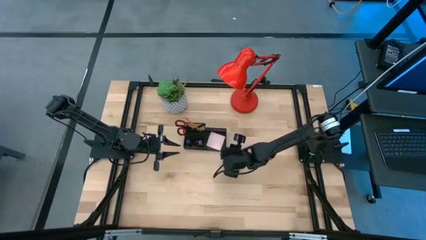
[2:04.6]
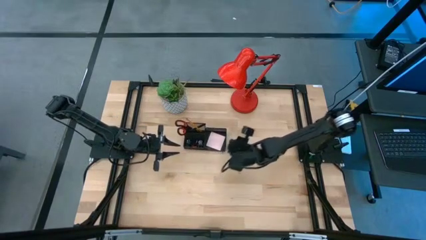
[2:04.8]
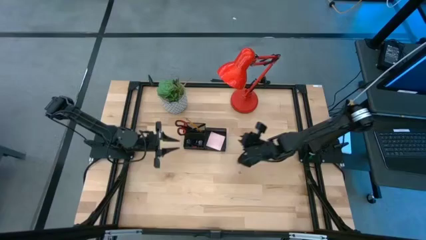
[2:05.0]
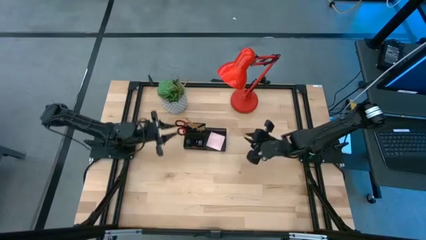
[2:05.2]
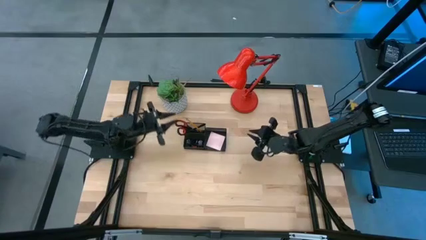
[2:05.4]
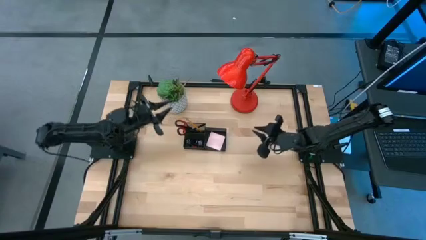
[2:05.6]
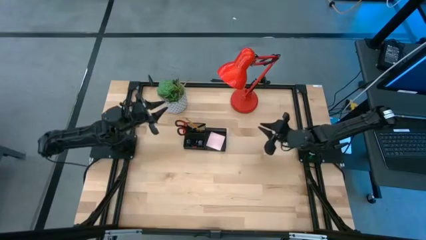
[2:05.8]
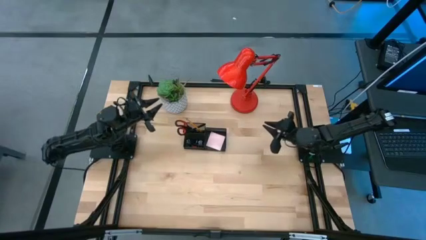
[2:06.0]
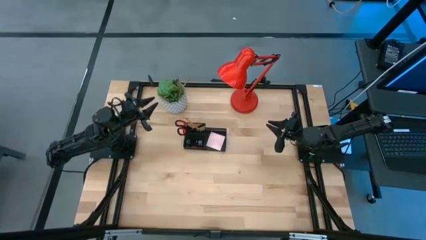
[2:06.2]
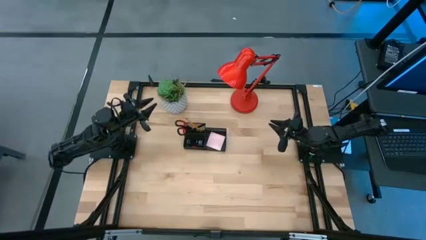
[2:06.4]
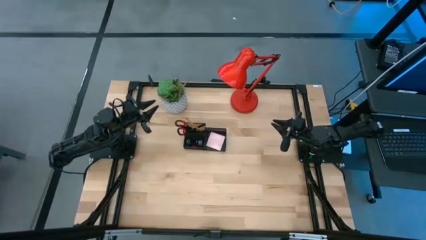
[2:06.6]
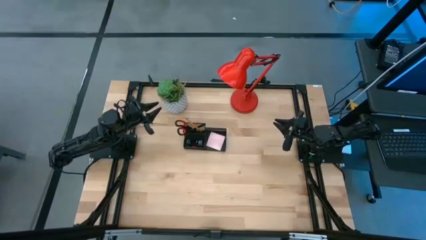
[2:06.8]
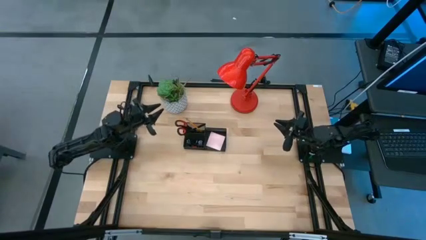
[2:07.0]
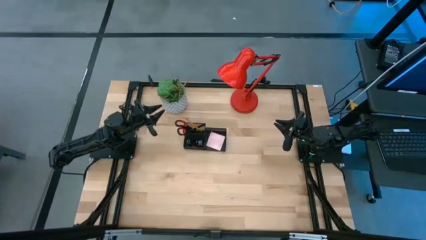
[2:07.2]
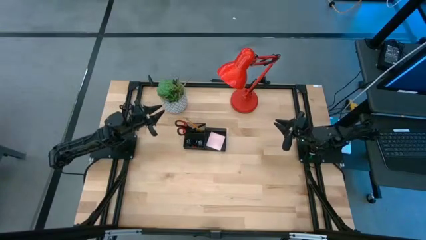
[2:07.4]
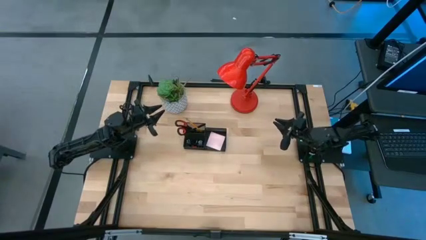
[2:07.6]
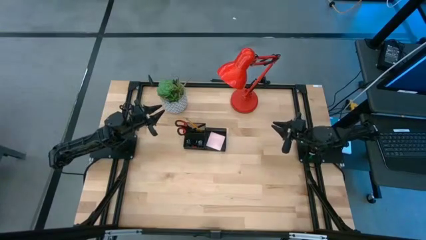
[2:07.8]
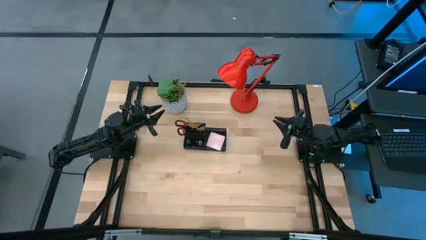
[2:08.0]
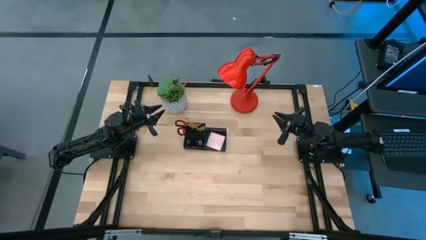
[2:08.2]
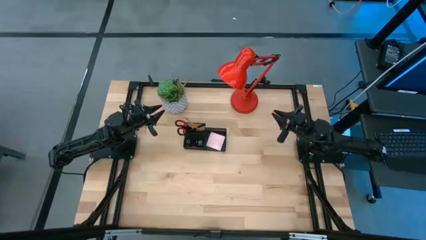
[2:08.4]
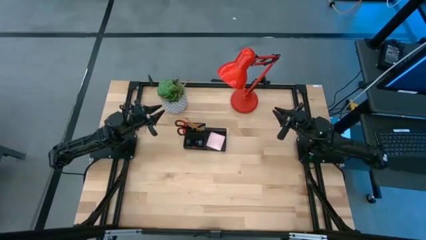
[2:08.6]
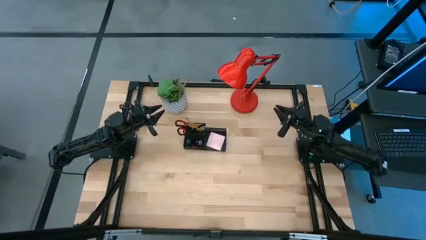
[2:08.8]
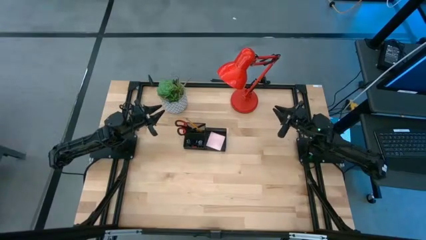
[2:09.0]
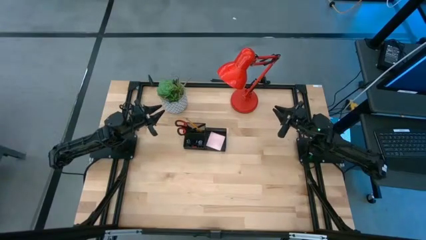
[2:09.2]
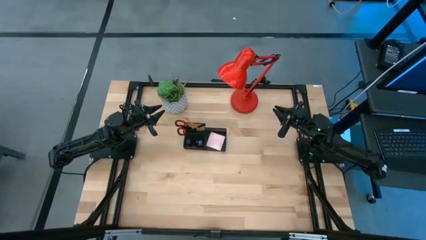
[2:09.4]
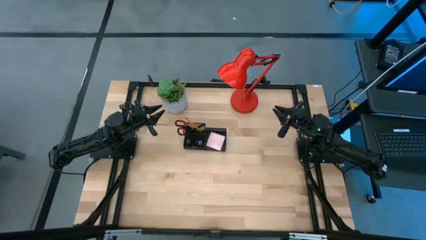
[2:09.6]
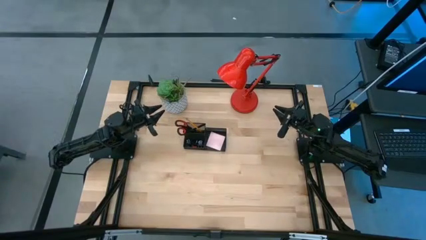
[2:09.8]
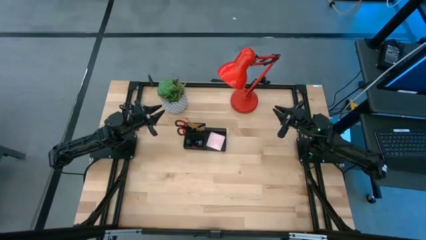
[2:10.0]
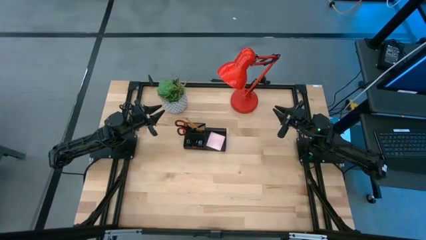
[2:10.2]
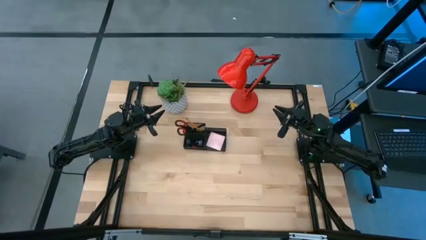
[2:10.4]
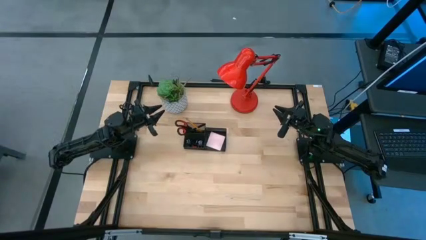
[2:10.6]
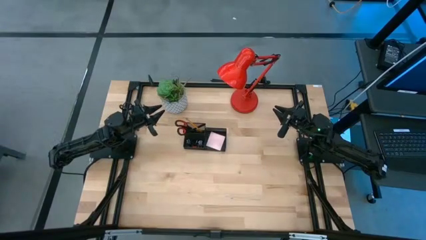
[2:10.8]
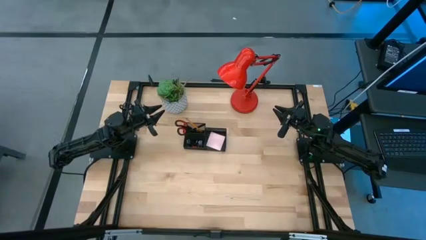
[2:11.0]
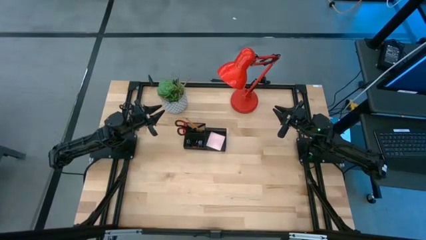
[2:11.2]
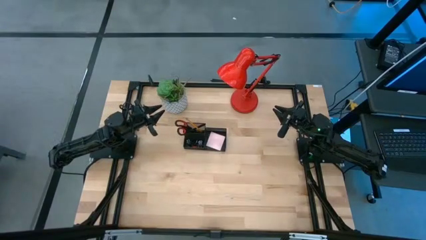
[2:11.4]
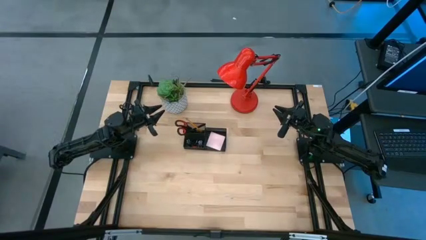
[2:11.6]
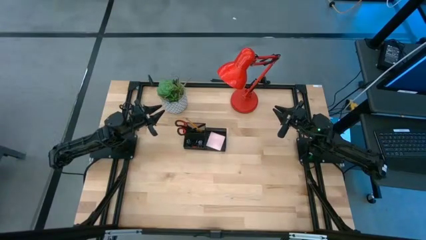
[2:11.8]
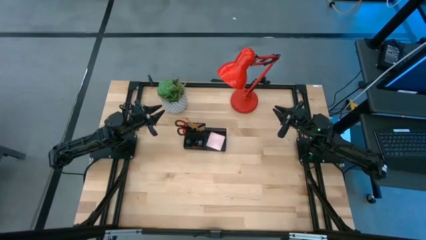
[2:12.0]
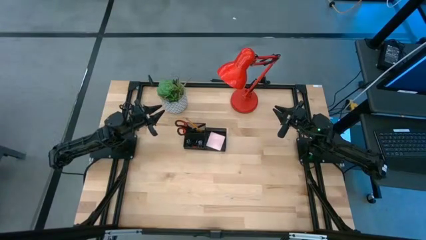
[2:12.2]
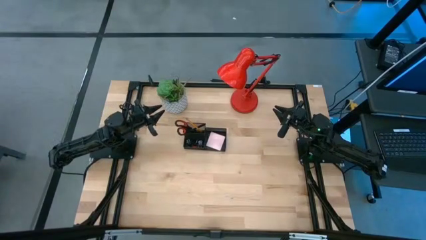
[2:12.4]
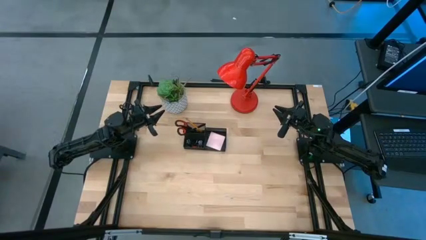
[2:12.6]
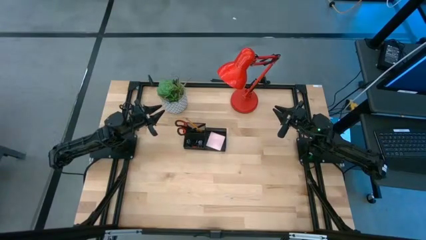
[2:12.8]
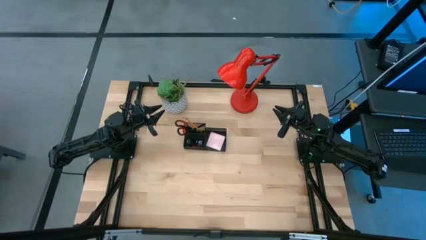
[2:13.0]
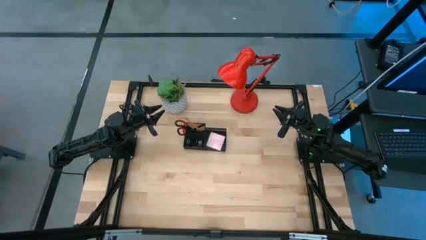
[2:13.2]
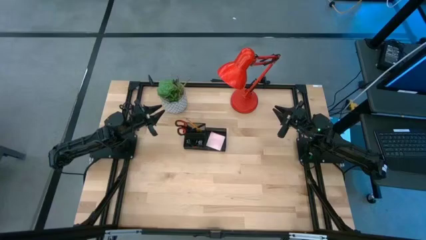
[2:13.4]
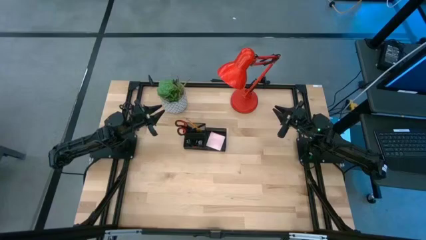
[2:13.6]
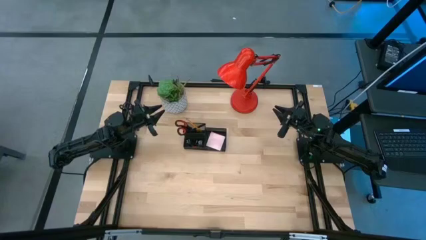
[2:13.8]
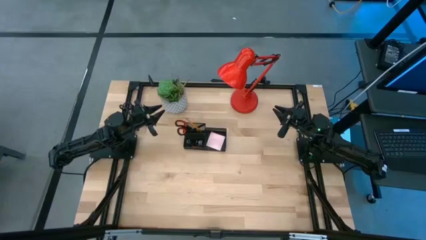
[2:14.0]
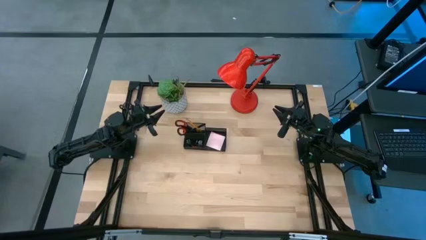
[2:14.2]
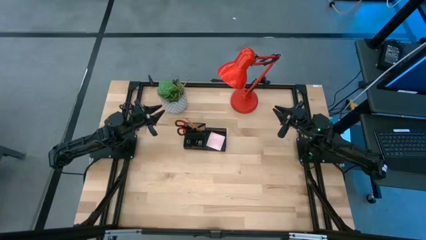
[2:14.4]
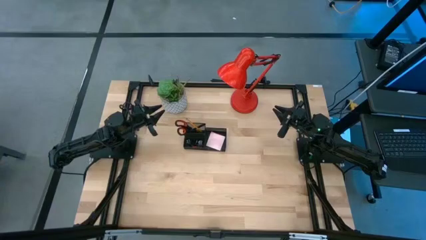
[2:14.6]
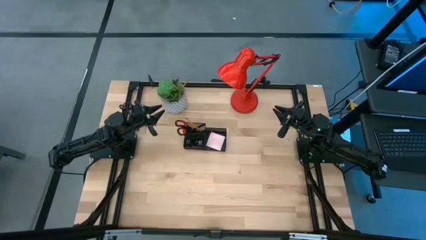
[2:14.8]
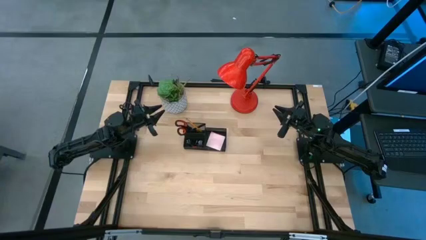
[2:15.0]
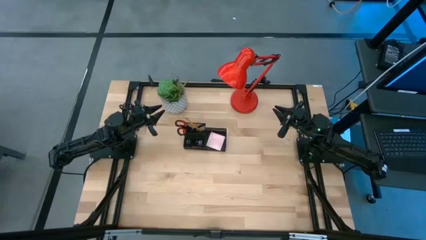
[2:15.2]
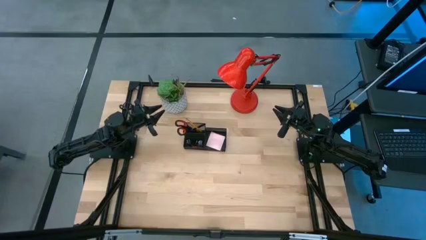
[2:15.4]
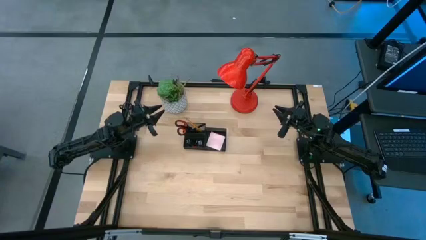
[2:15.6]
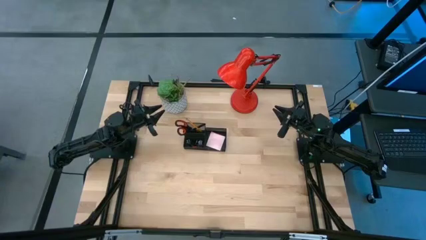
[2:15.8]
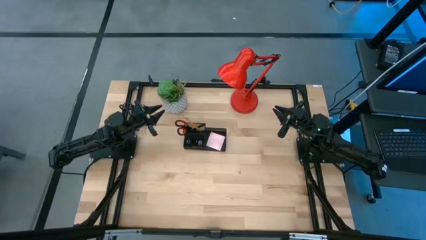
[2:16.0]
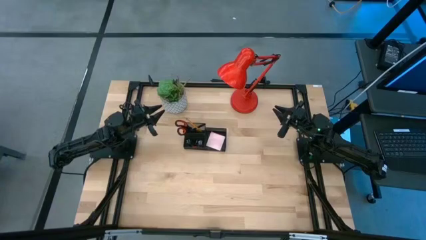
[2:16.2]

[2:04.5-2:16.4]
Task: Pick and place office supplies into organizer
Return to Home Position
